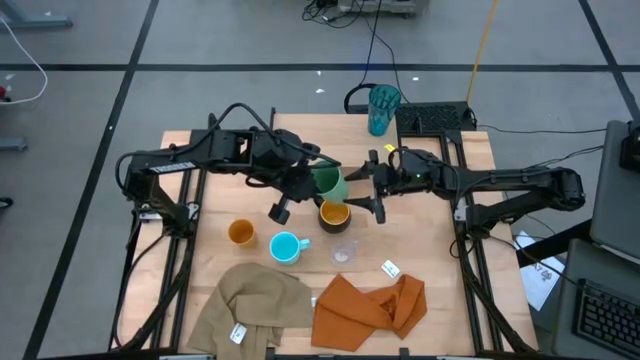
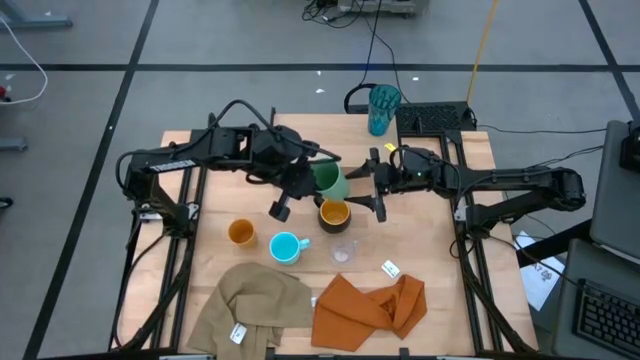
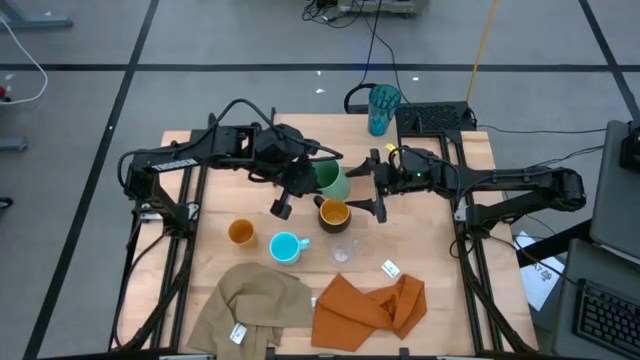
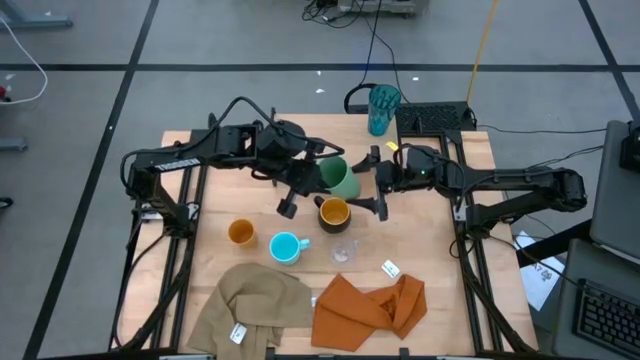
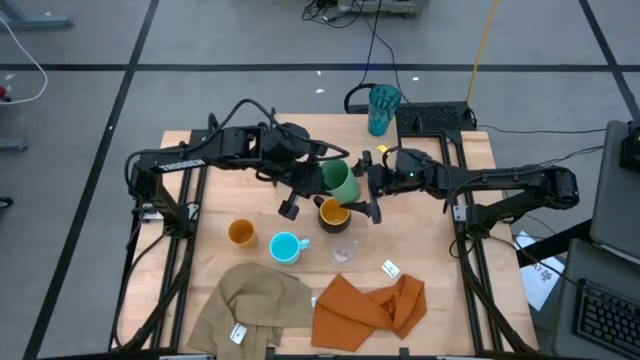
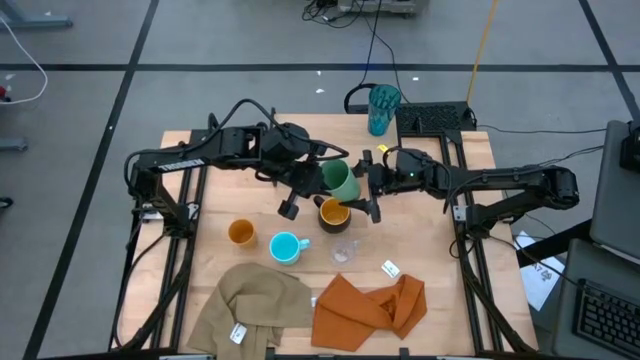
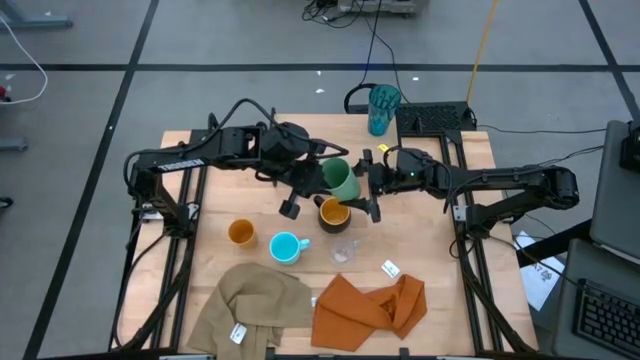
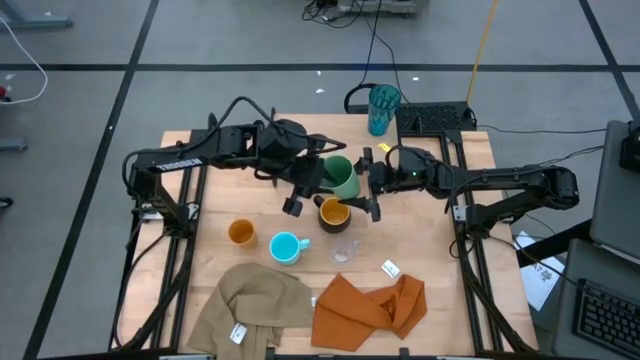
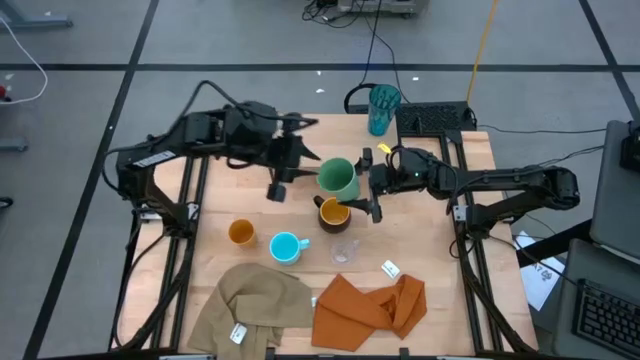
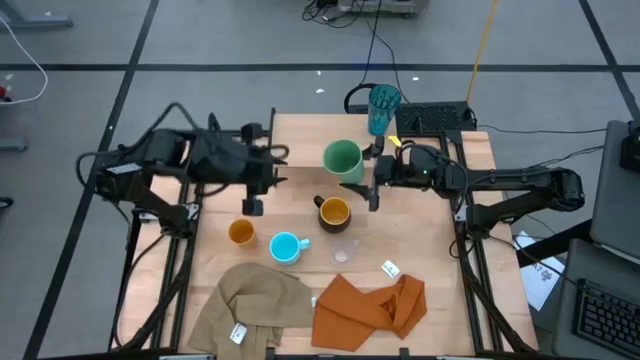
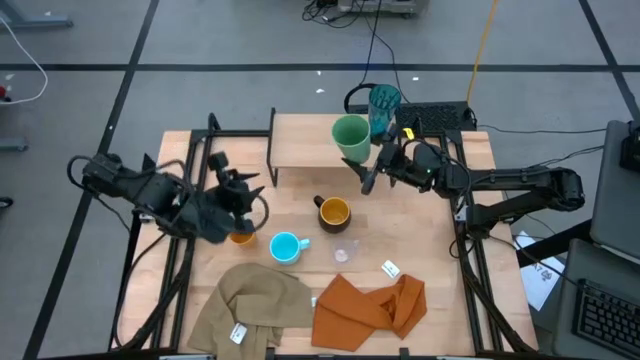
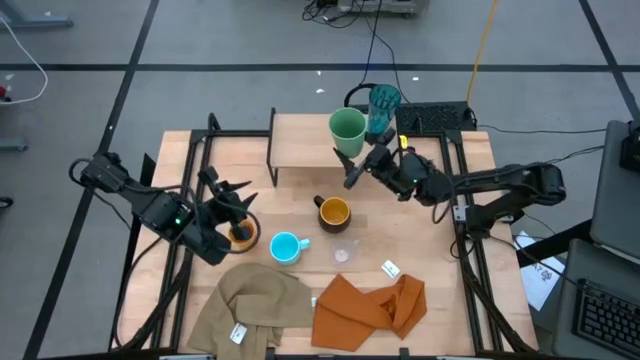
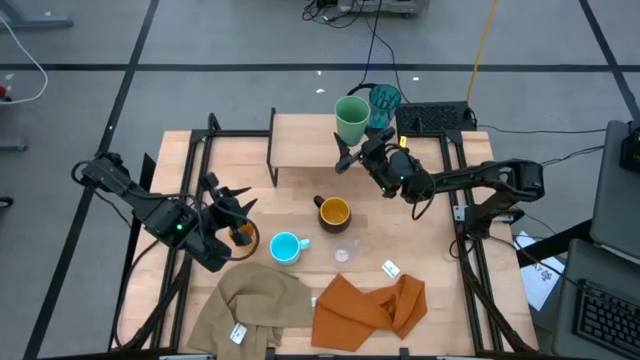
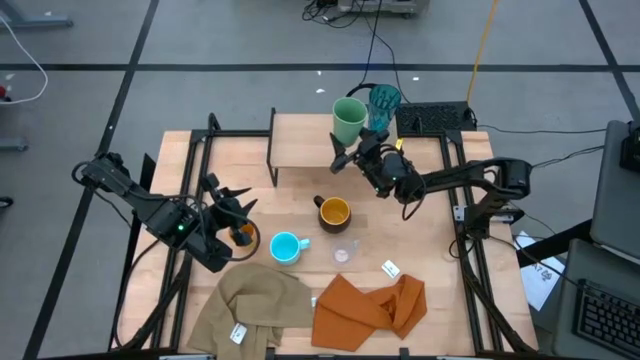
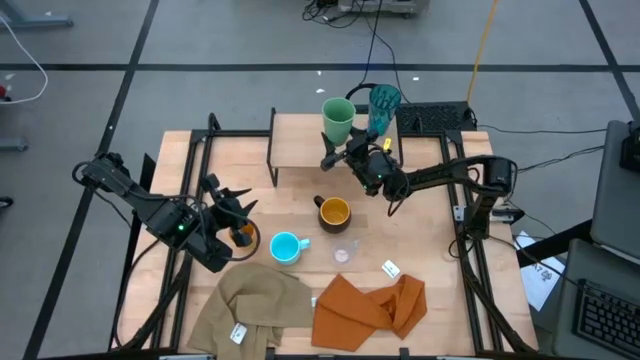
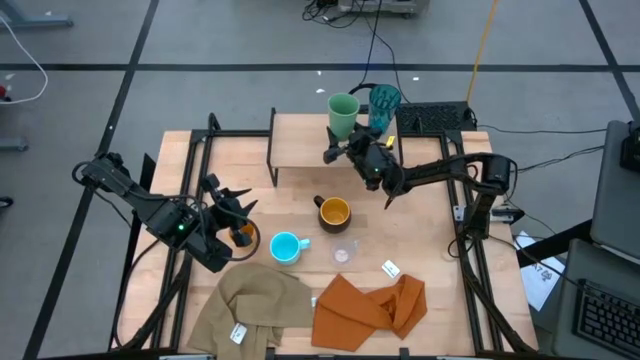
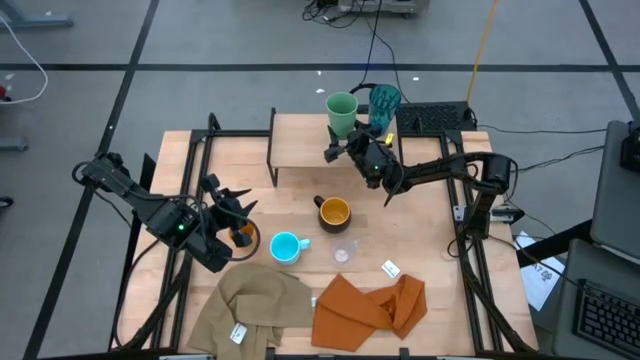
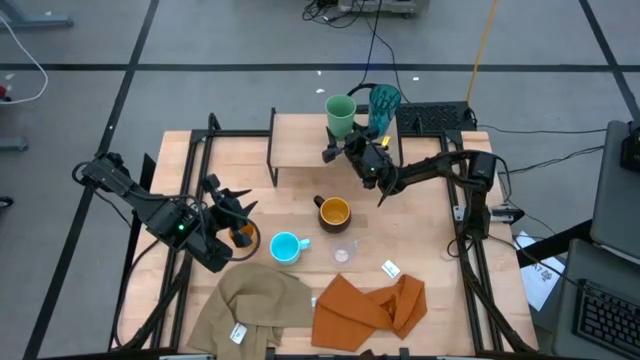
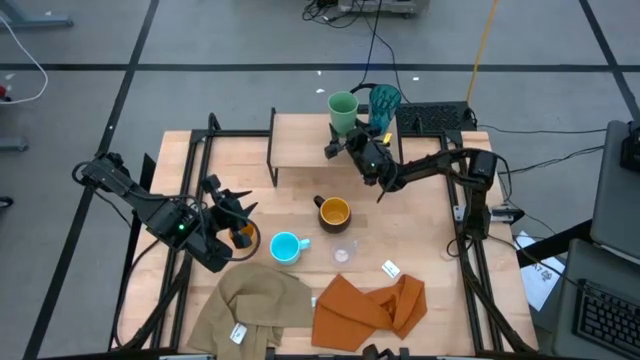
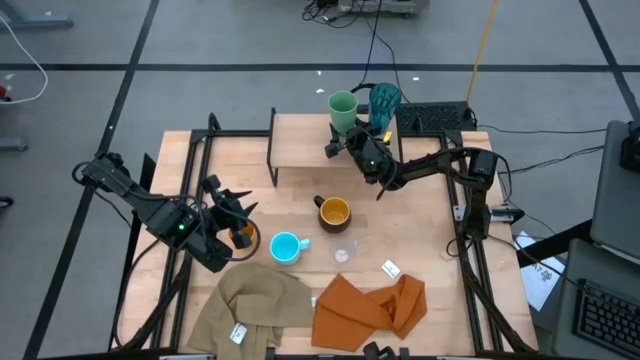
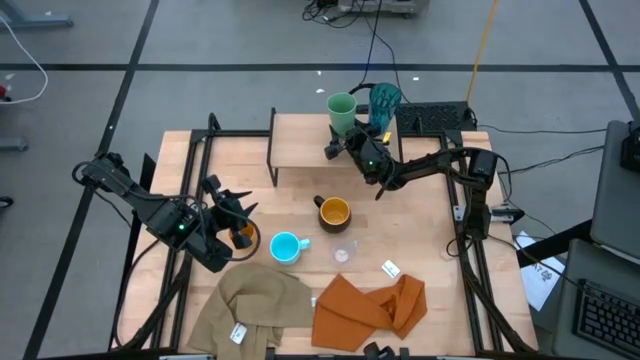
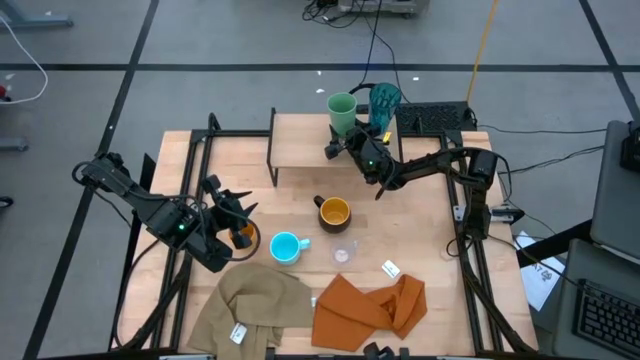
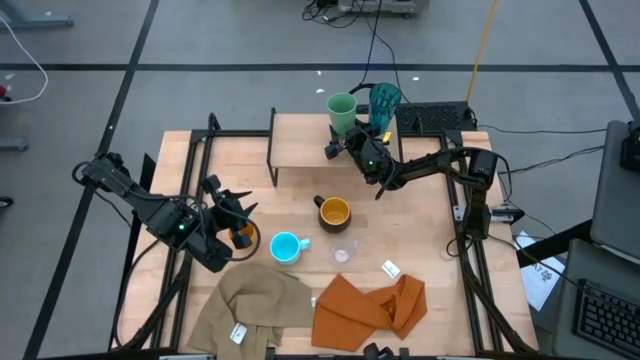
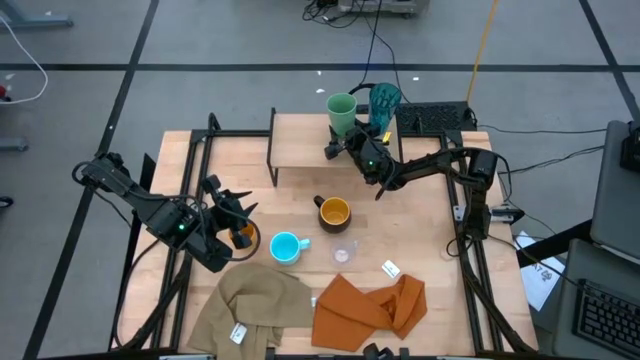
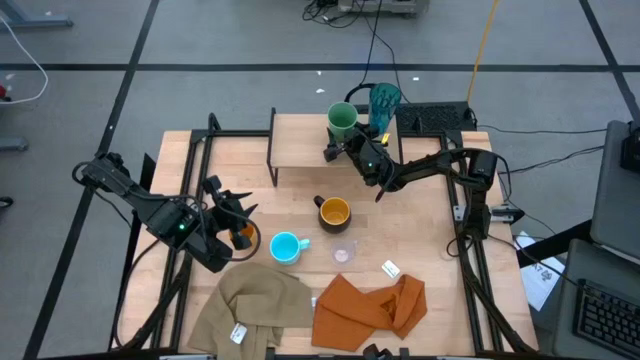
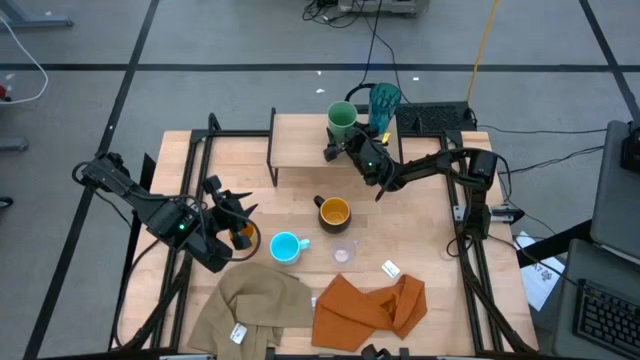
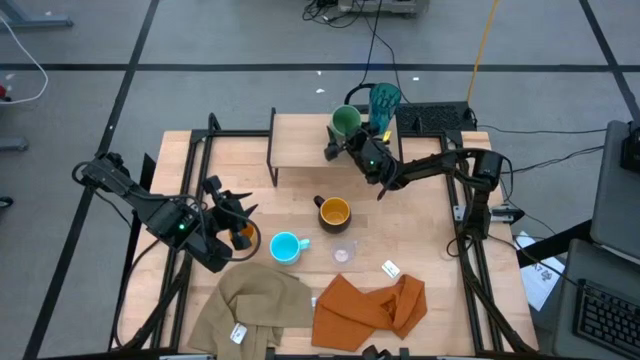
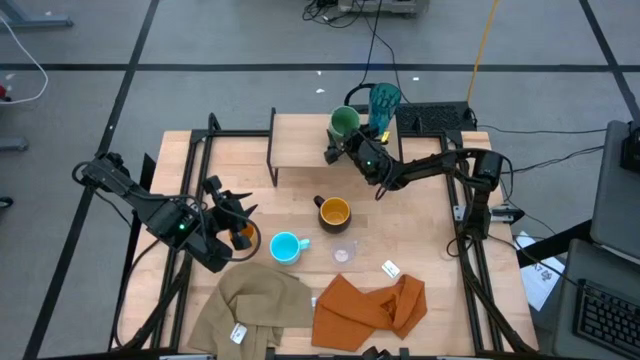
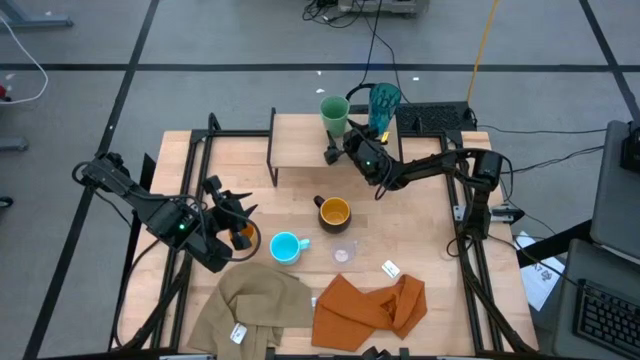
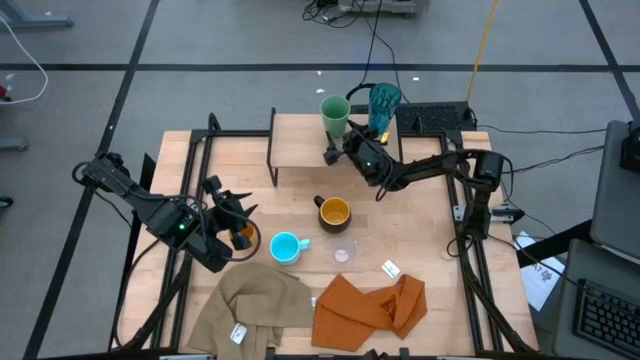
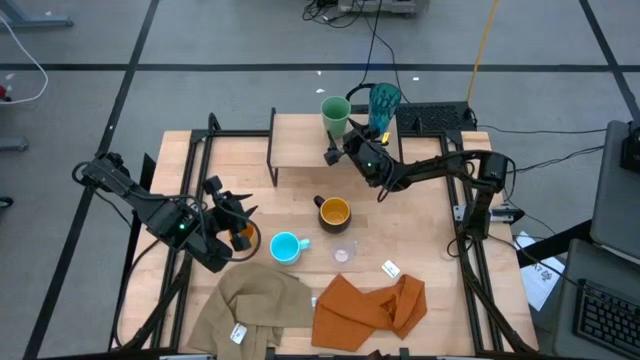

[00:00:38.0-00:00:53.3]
Task: Stack small to large cups/mugs on shelf
Put the green cup on the shelf

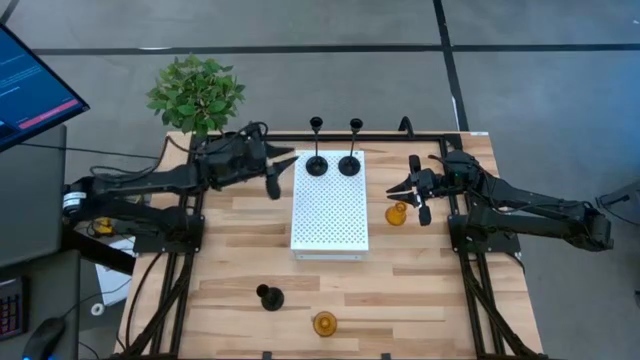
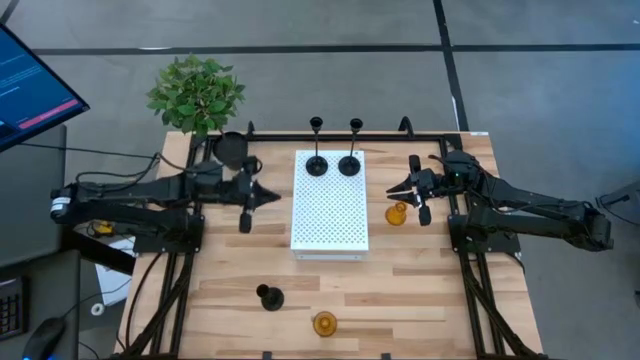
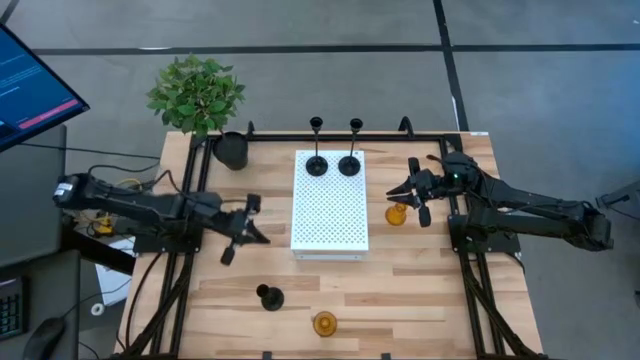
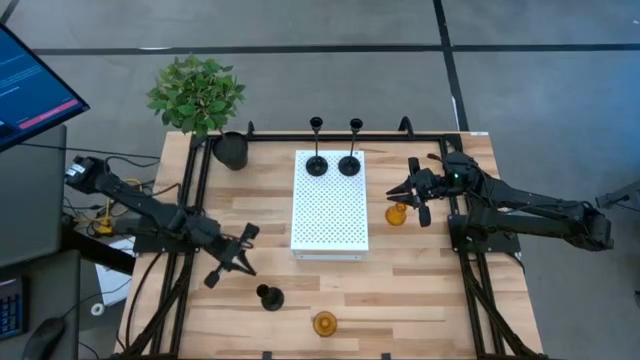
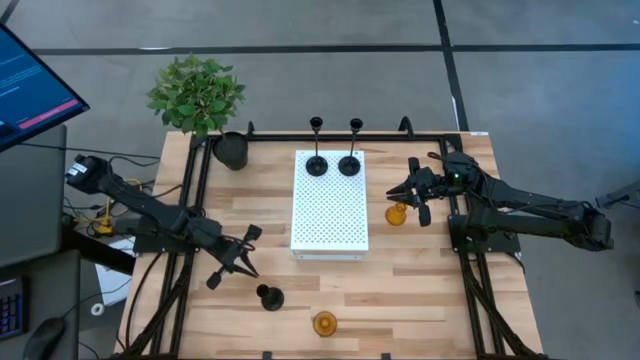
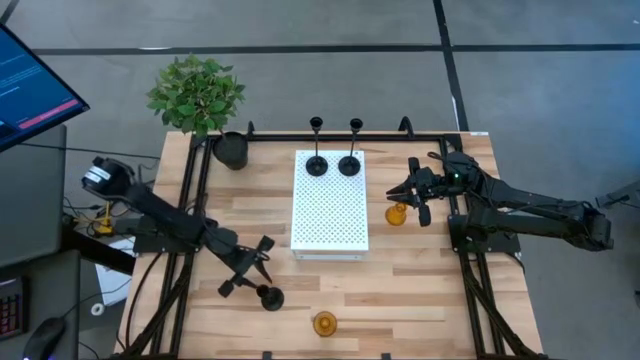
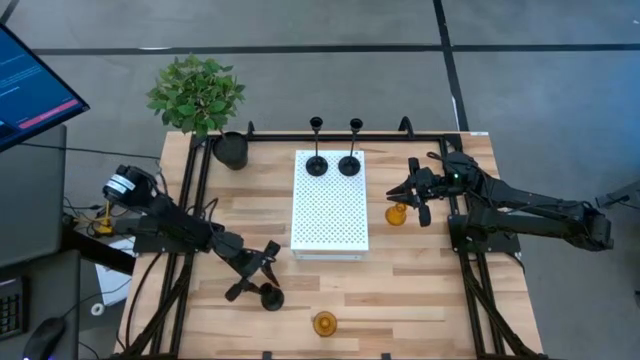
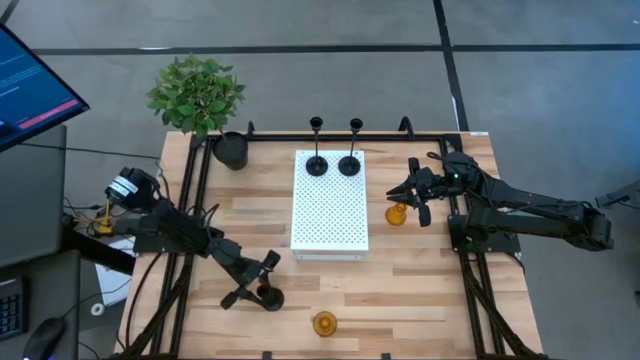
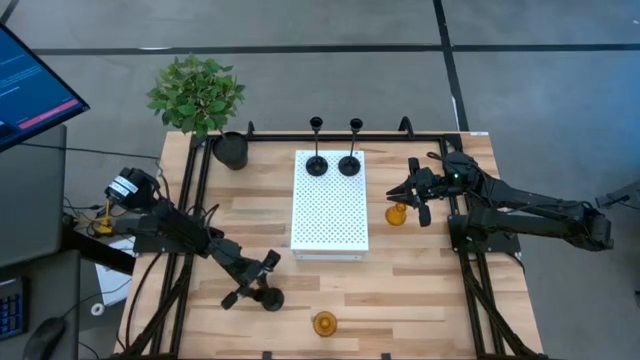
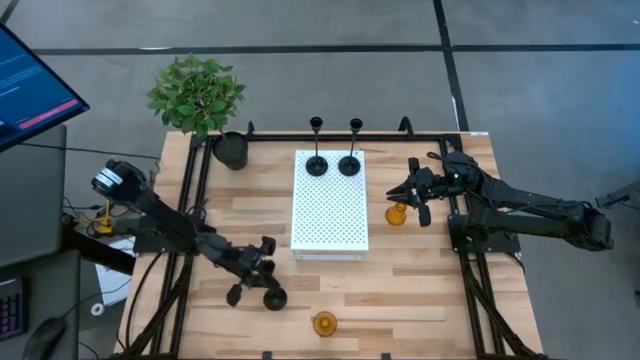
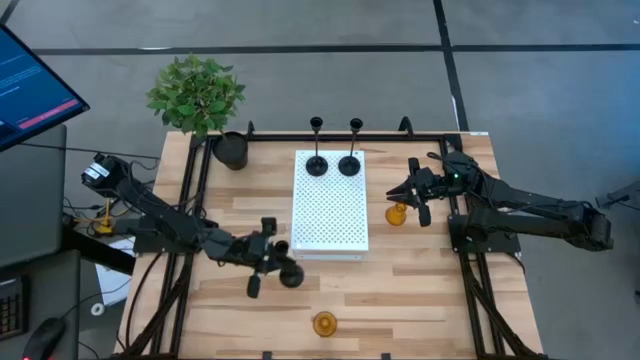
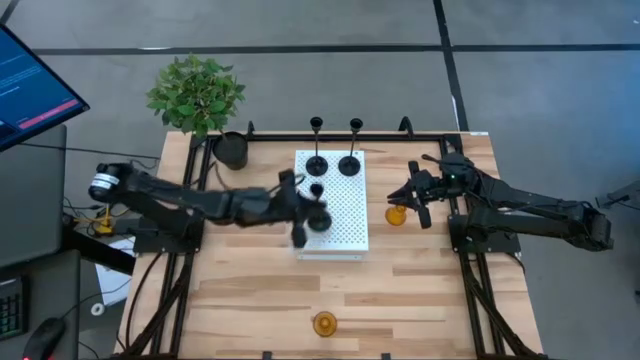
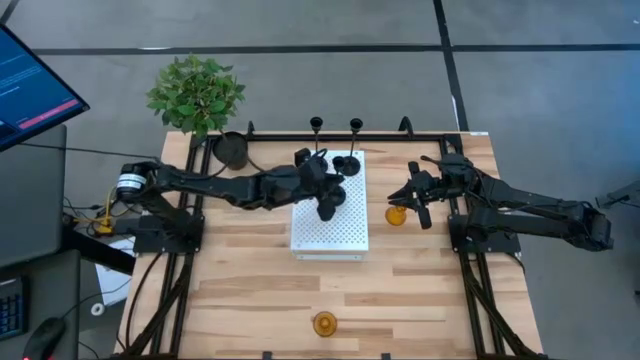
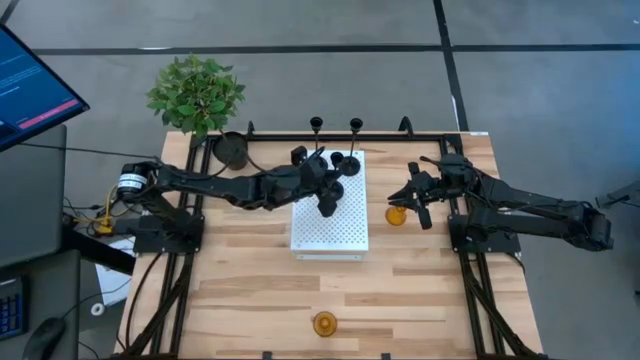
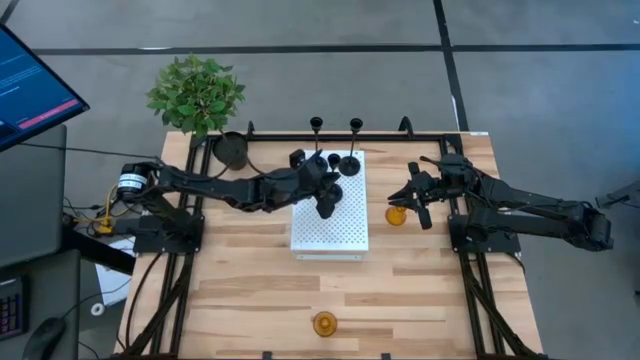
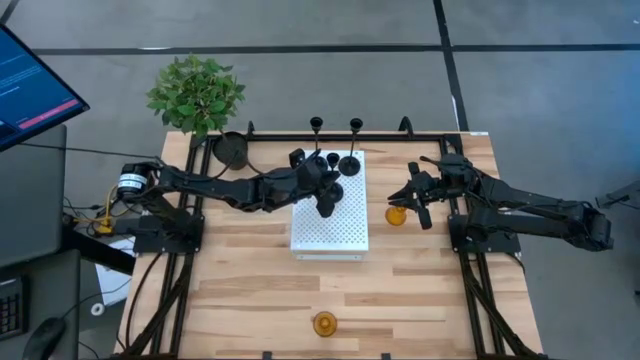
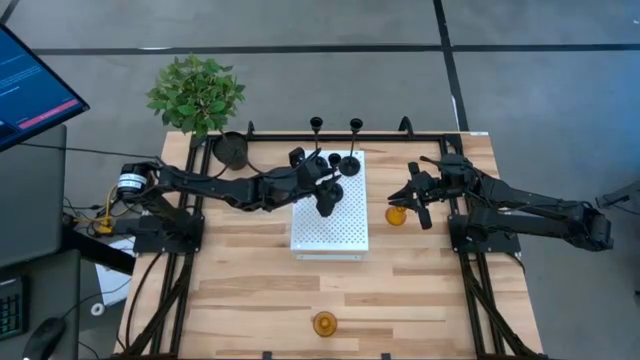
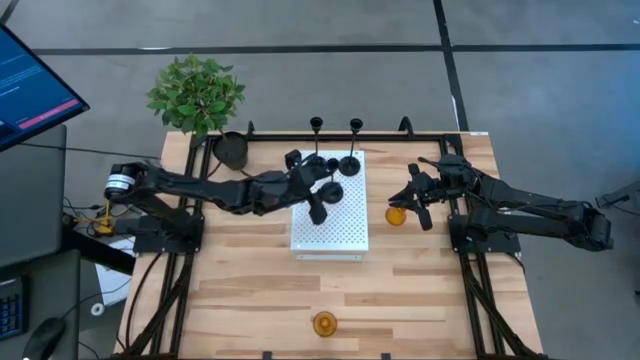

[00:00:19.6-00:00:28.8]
Task: Pick & Place candle stick holders
Put the black candle holder on the shelf
